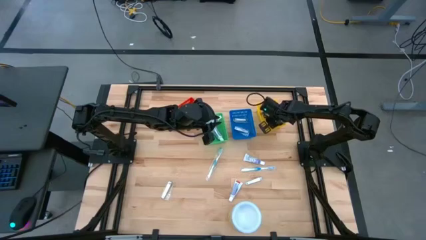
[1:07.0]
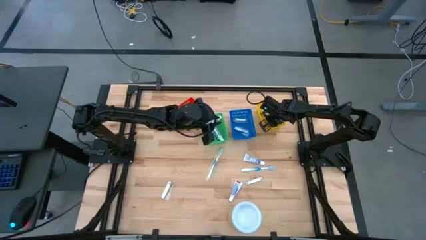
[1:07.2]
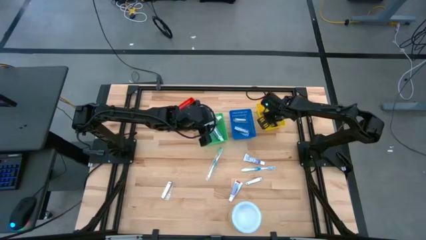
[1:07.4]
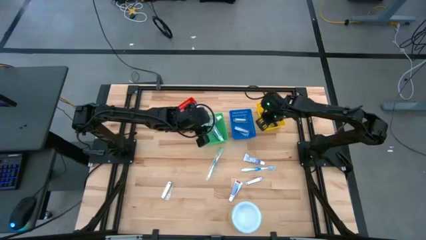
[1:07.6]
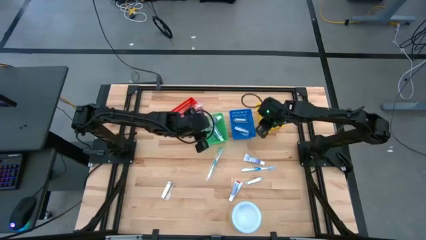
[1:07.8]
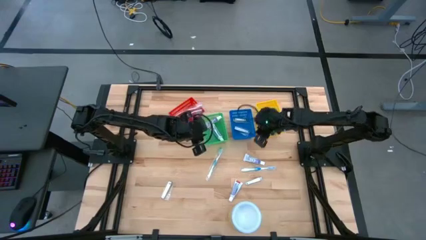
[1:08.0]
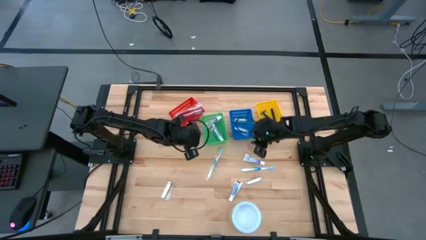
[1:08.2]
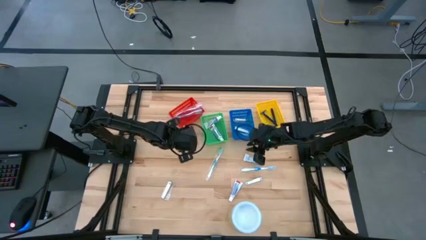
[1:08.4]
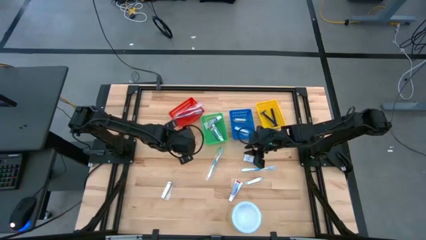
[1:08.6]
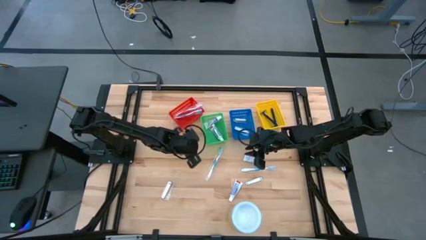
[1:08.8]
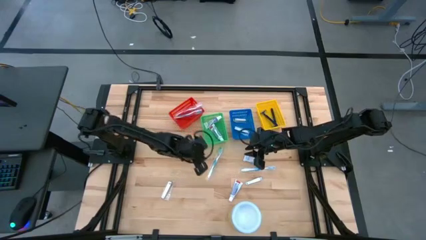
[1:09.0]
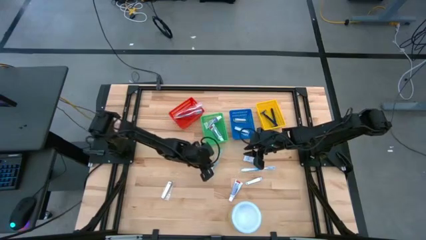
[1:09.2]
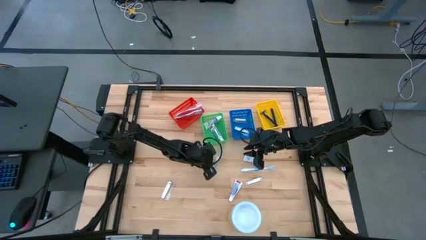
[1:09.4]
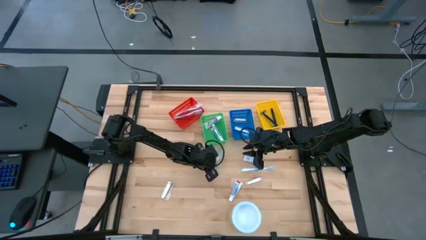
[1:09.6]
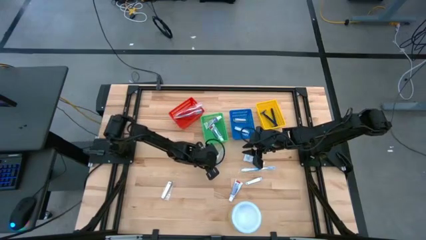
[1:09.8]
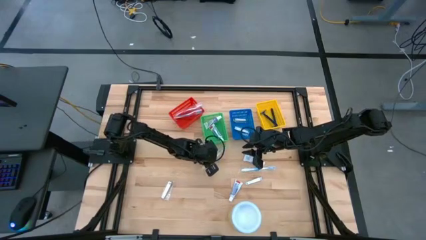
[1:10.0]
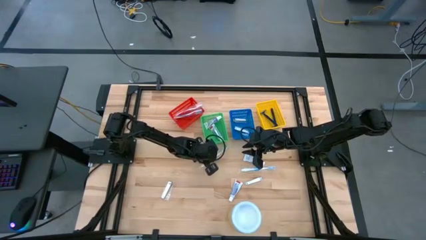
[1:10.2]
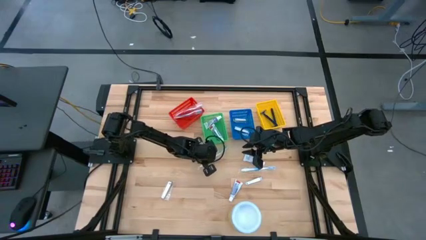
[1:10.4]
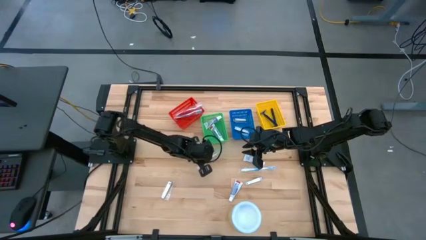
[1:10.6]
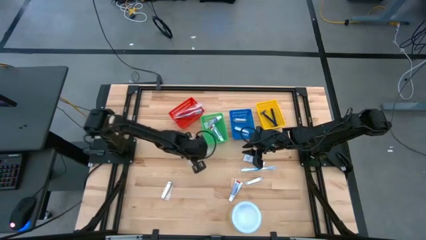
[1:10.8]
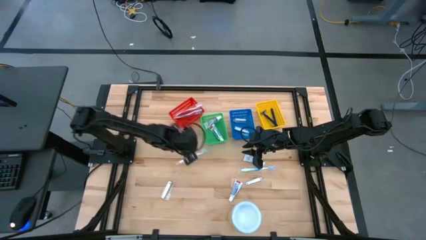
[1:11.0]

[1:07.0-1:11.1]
Task: Pick & Place Travel size toiletries
Put the green toothbrush into the red bin

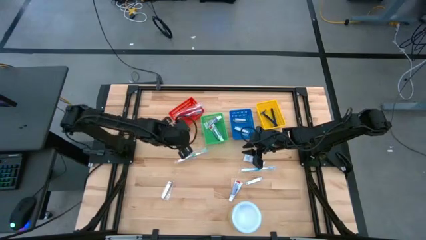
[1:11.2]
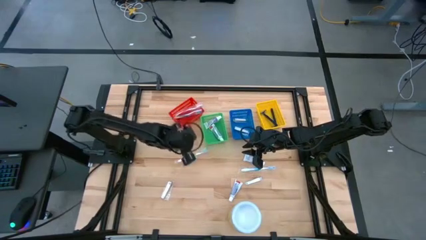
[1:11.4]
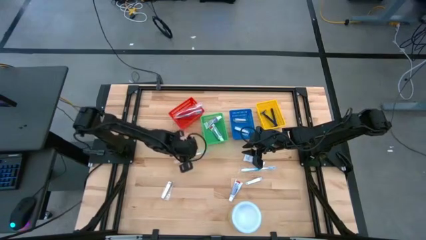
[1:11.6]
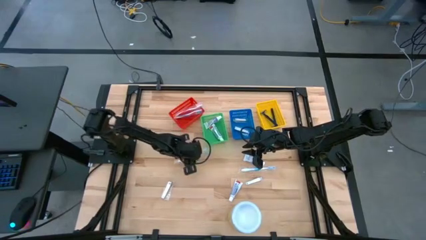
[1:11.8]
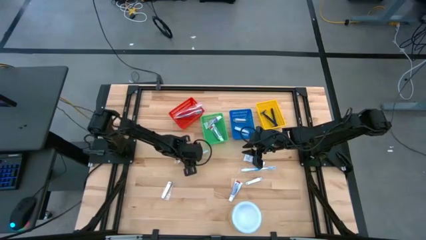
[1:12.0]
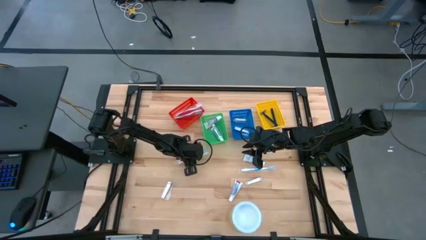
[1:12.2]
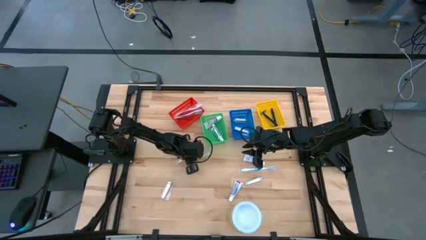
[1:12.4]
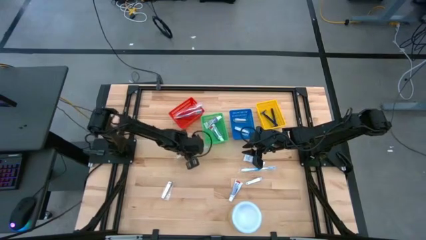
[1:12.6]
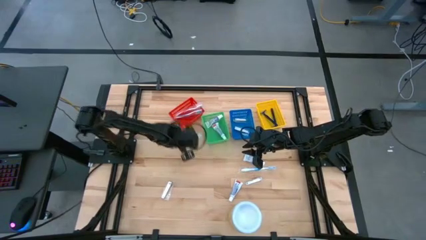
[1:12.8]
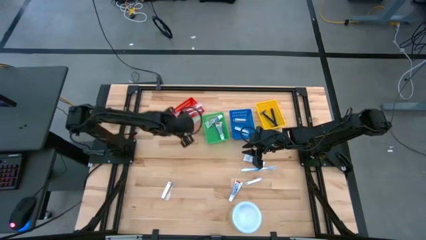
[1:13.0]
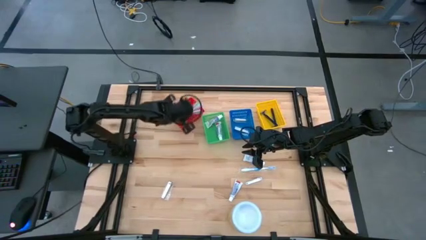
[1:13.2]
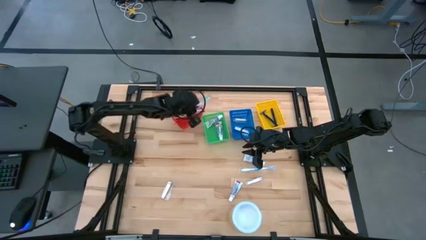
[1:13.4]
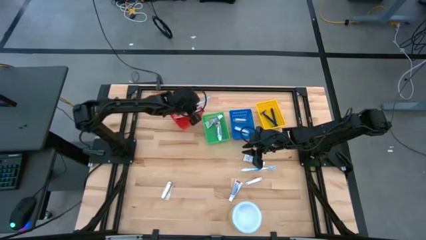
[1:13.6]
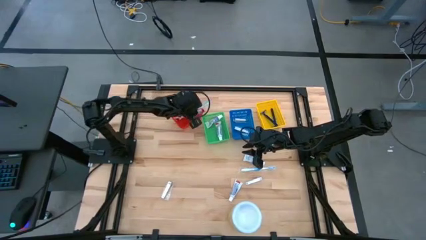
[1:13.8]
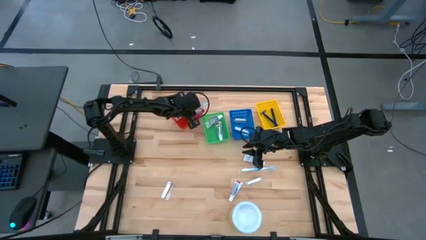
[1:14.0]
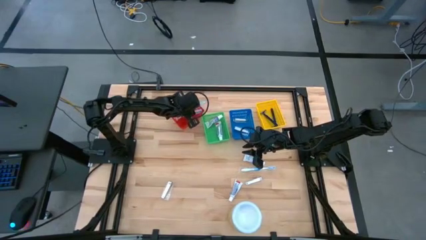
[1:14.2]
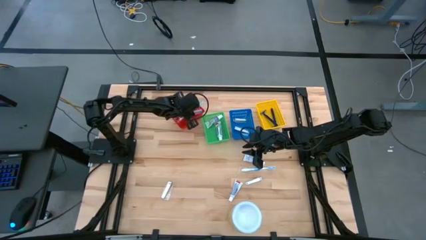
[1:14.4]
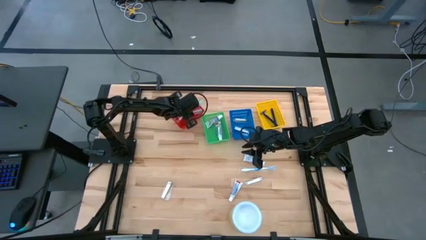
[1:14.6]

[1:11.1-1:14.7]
Put the green toothbrush into the red bin

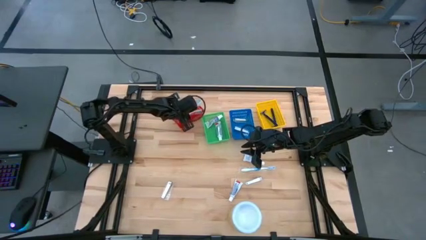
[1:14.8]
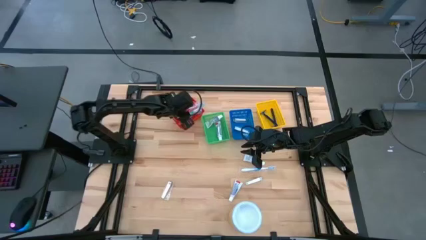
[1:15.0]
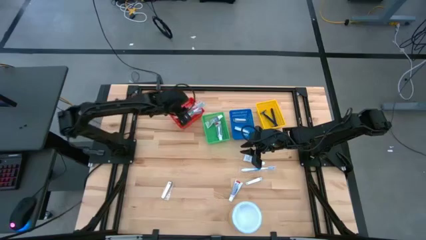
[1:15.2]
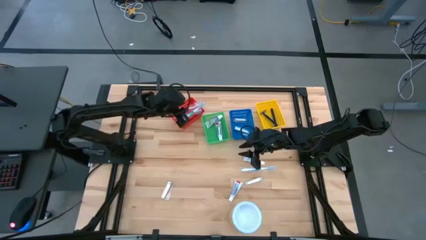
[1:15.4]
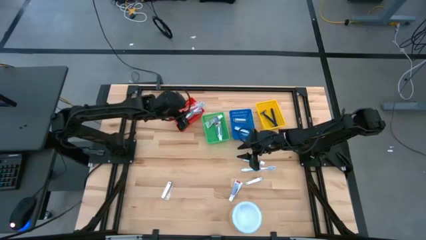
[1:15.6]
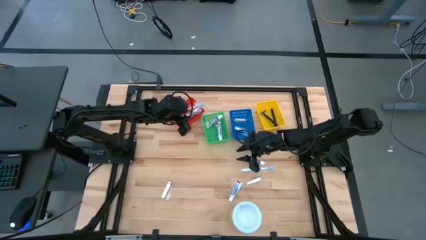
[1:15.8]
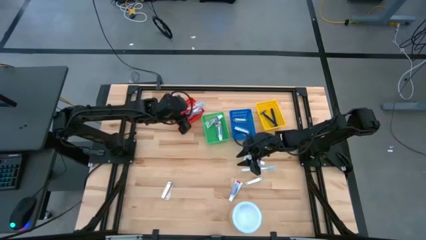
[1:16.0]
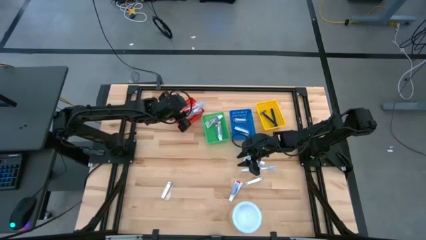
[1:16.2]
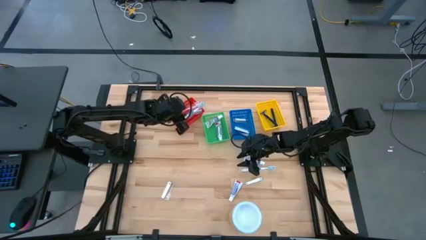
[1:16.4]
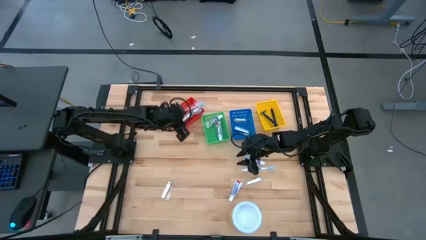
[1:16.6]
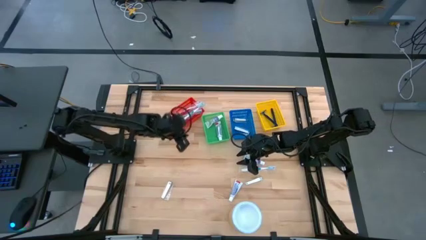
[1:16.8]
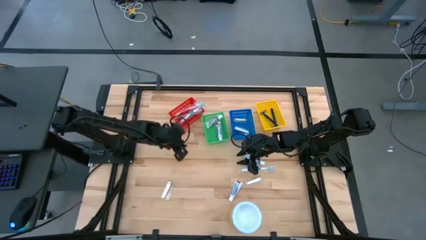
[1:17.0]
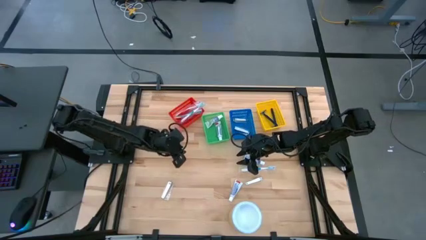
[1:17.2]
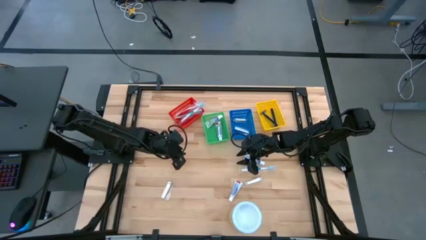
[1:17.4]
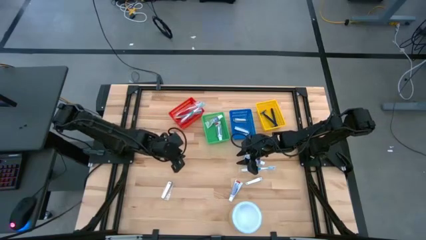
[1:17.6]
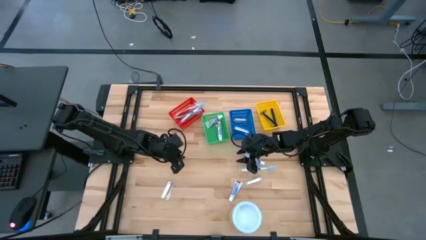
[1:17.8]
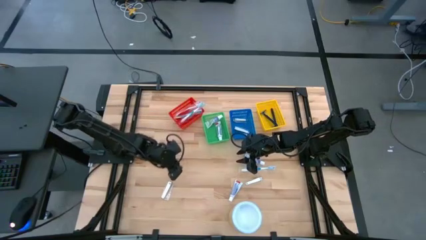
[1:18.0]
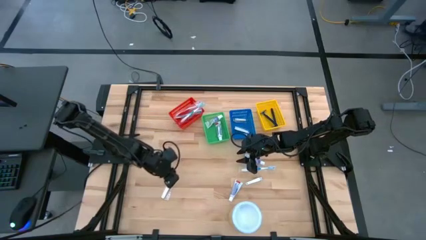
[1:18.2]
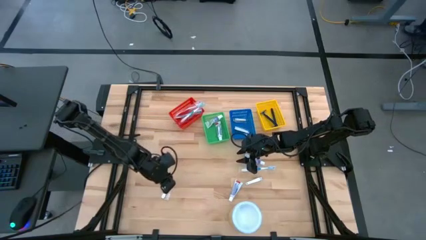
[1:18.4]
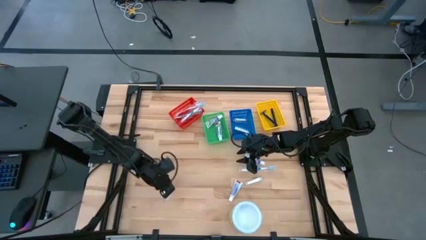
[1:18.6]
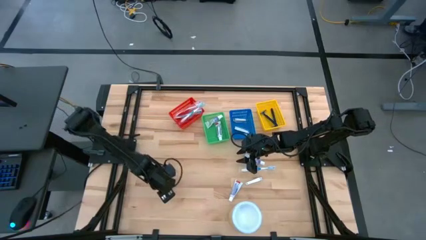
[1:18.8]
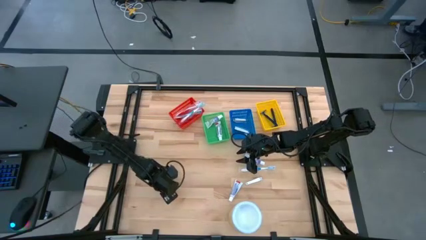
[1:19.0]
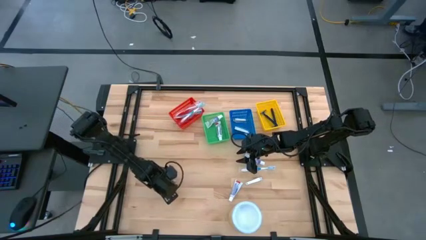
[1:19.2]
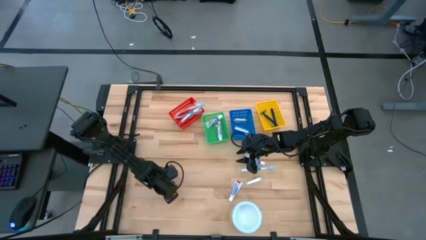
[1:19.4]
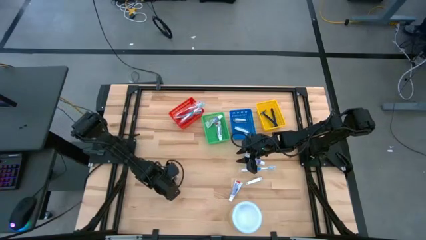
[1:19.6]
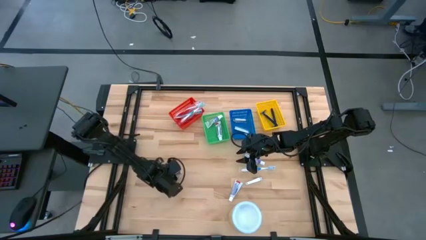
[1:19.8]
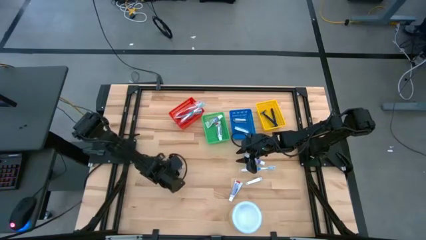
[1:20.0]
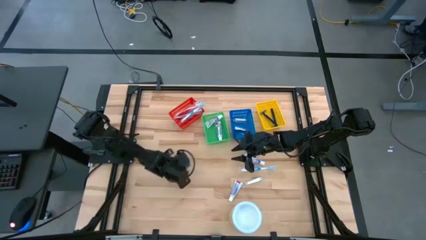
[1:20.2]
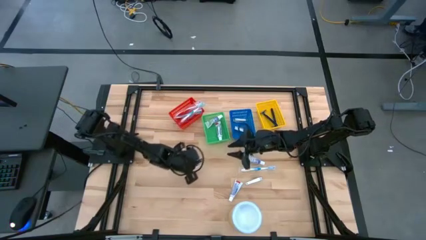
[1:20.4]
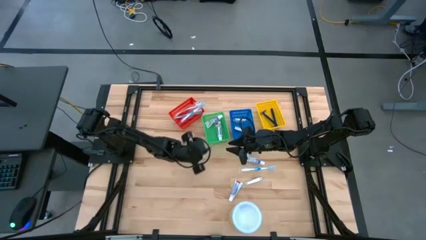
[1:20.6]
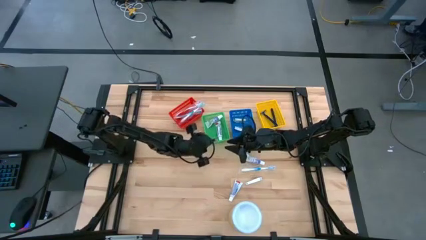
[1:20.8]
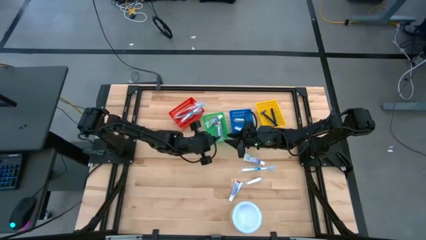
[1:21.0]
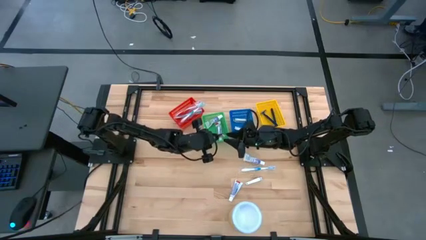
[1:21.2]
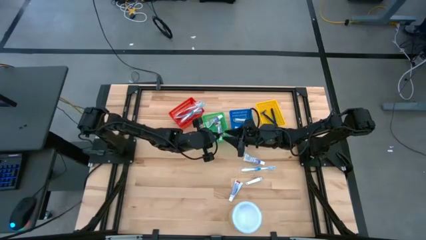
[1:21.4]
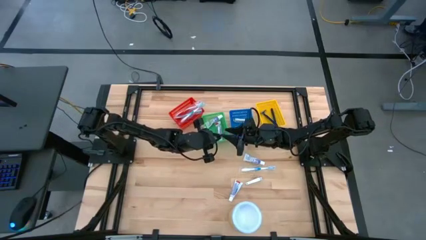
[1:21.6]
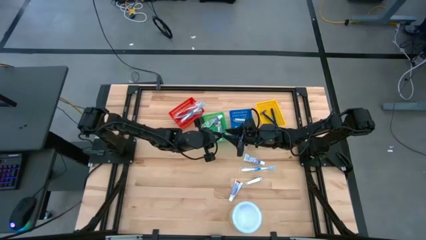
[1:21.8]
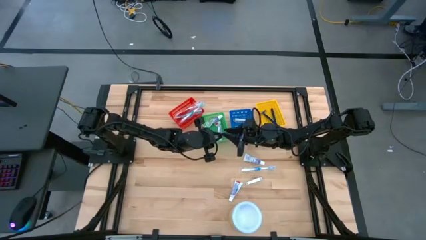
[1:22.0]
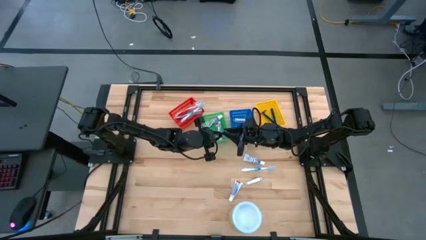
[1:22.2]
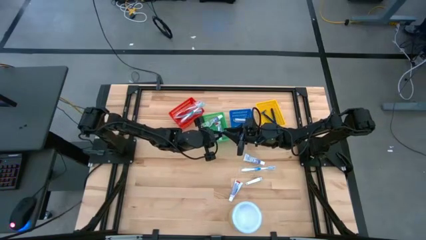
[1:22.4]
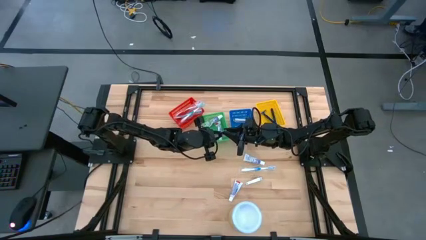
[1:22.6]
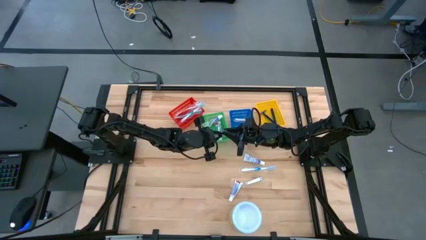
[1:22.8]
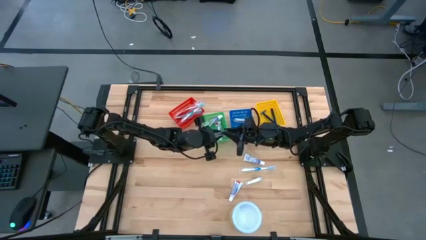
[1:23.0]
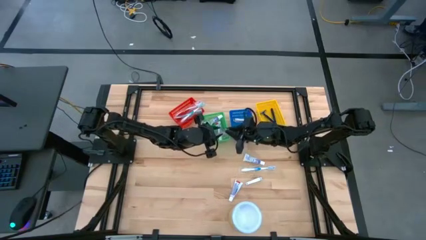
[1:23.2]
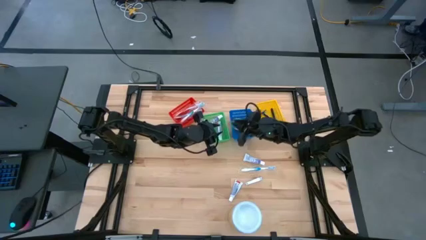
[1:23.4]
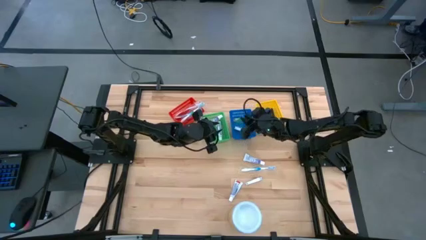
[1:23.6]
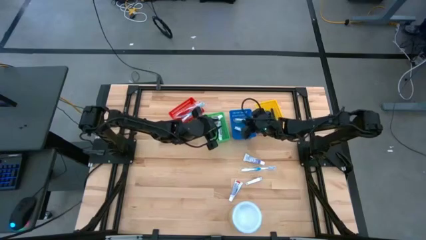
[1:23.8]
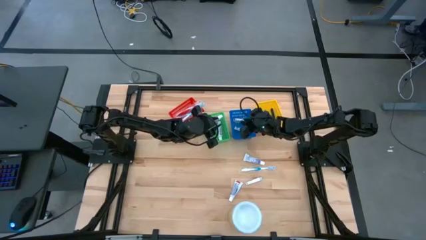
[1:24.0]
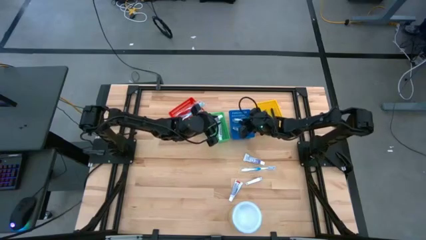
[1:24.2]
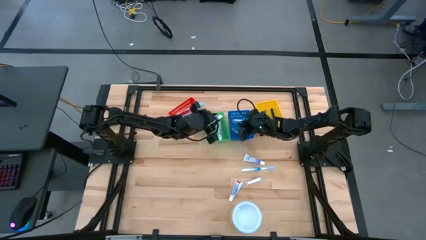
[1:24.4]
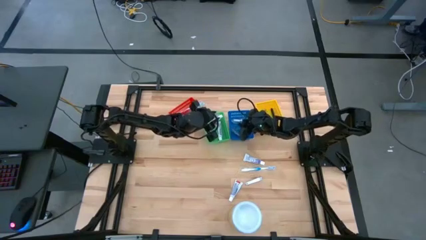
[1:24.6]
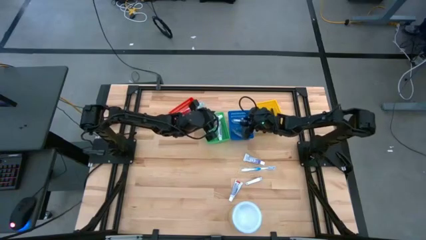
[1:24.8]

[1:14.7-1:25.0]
Put the silver nail cutter into the blue bin
